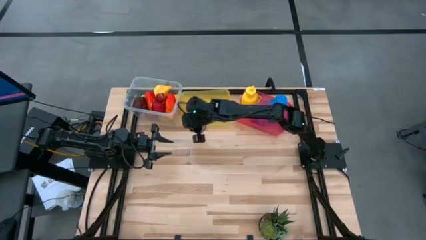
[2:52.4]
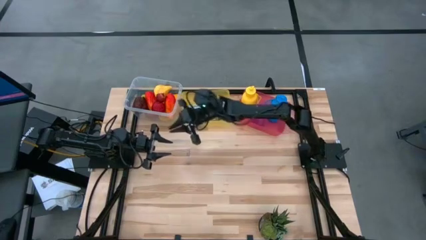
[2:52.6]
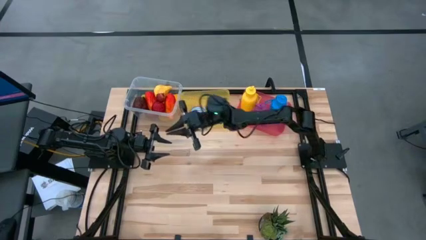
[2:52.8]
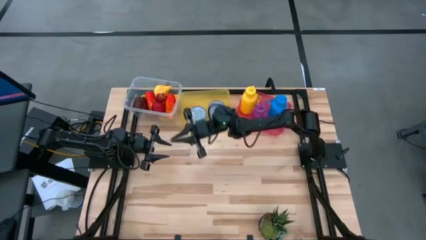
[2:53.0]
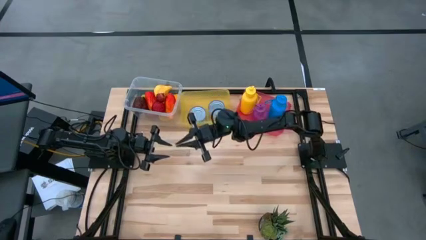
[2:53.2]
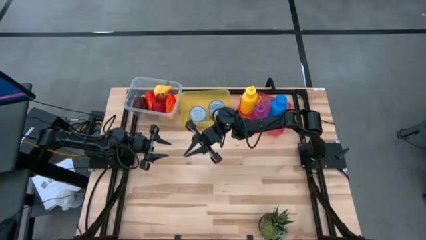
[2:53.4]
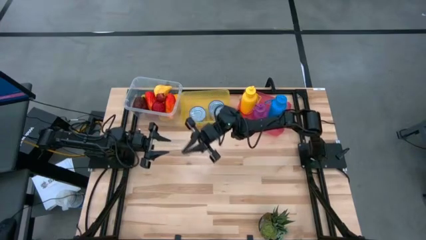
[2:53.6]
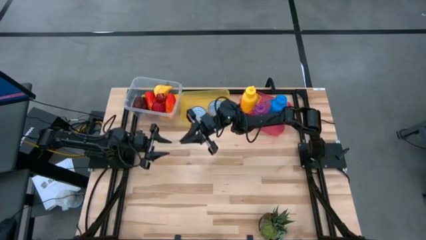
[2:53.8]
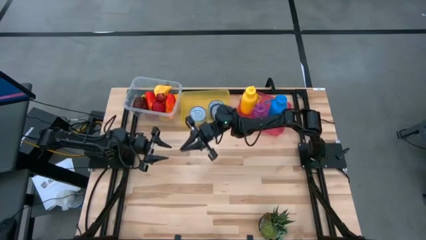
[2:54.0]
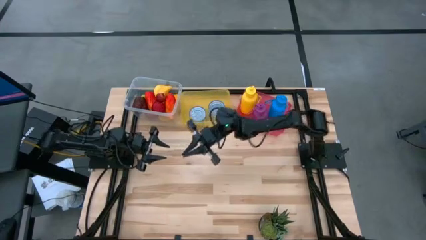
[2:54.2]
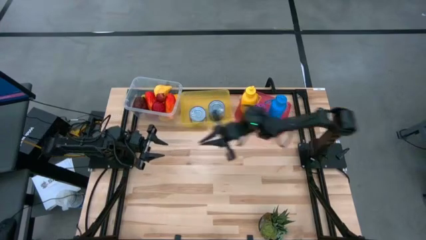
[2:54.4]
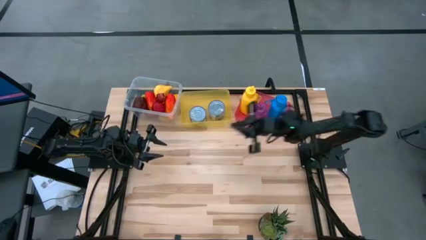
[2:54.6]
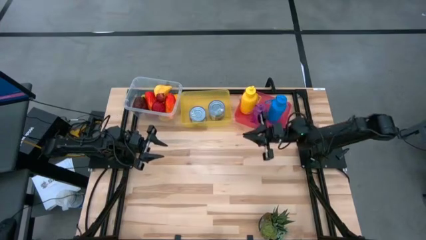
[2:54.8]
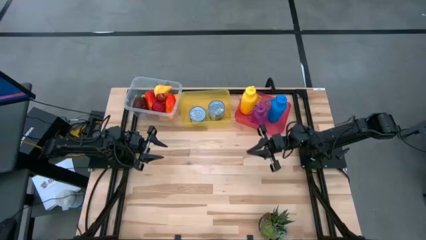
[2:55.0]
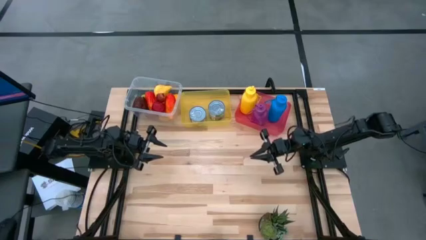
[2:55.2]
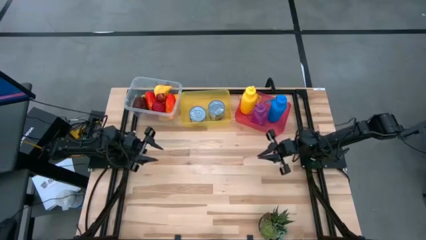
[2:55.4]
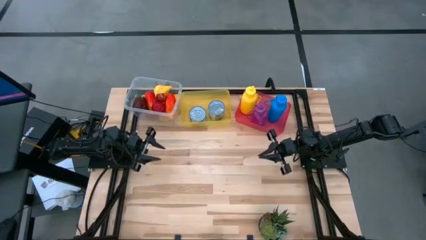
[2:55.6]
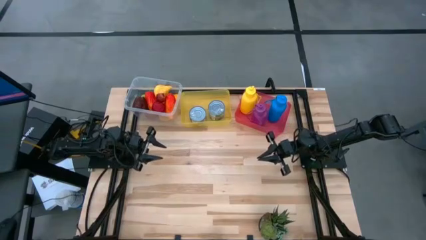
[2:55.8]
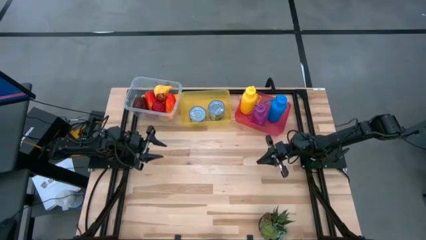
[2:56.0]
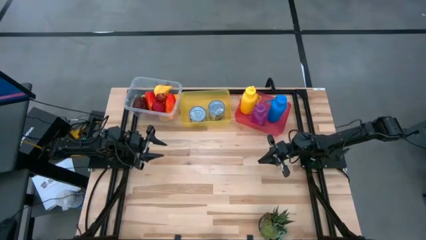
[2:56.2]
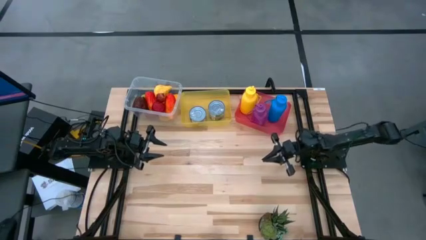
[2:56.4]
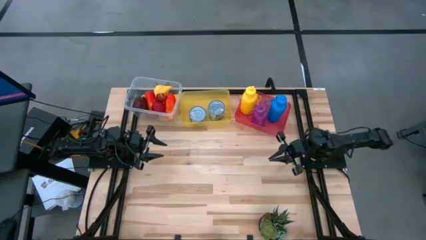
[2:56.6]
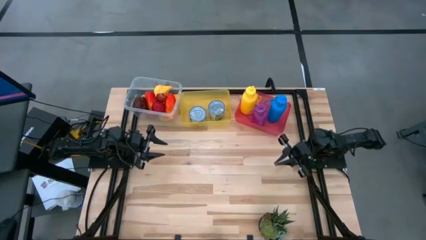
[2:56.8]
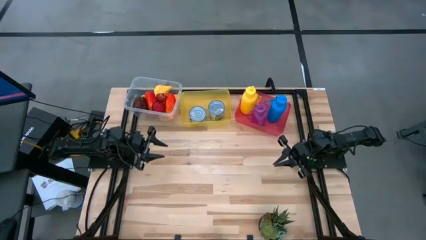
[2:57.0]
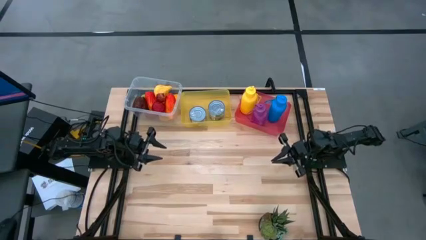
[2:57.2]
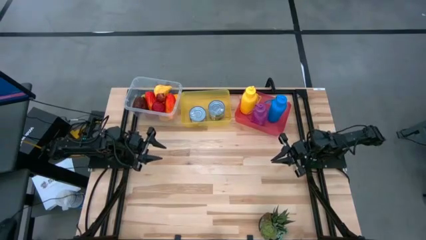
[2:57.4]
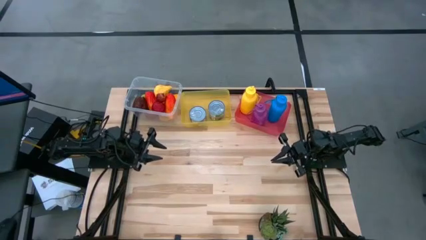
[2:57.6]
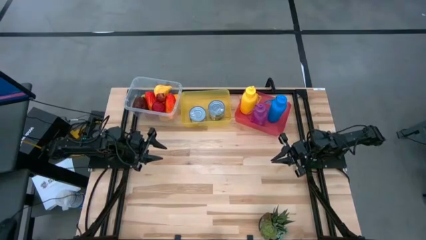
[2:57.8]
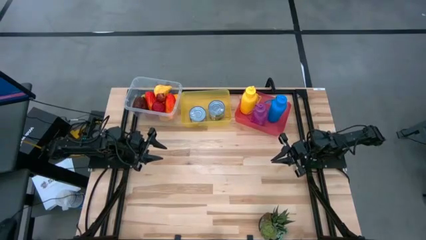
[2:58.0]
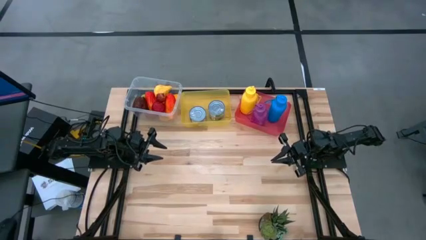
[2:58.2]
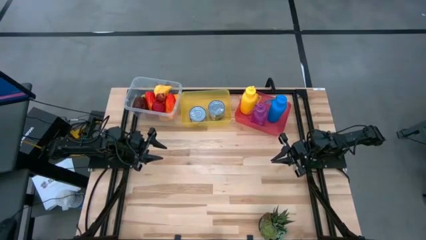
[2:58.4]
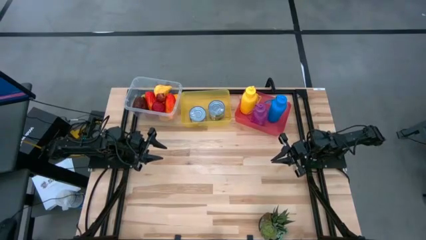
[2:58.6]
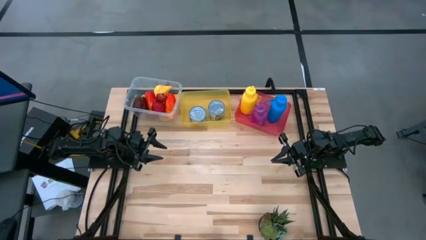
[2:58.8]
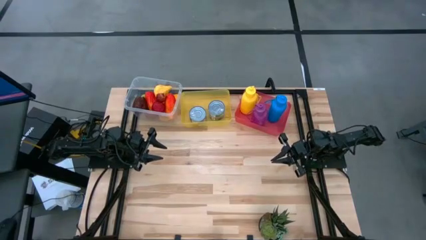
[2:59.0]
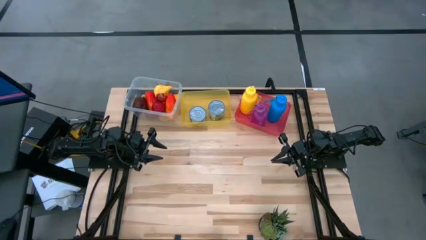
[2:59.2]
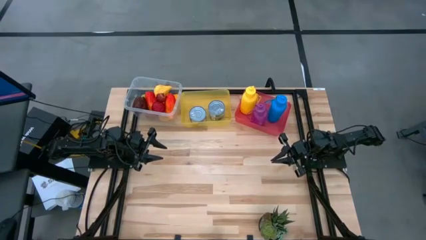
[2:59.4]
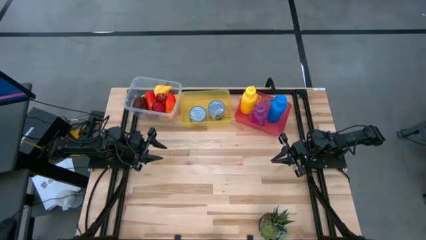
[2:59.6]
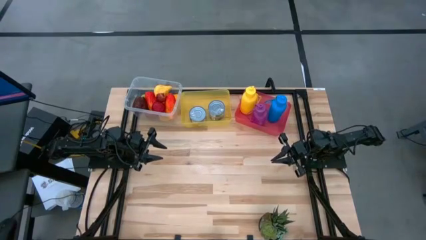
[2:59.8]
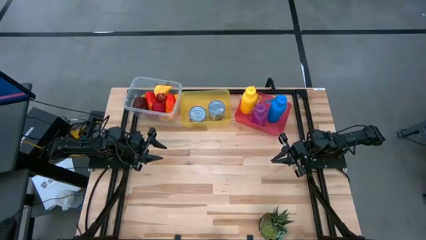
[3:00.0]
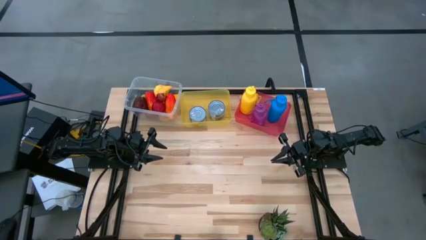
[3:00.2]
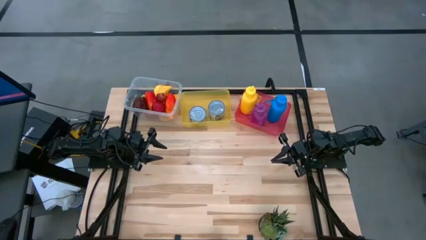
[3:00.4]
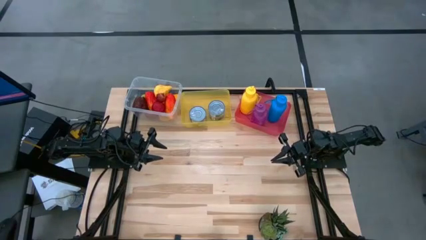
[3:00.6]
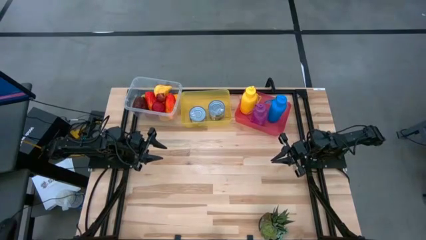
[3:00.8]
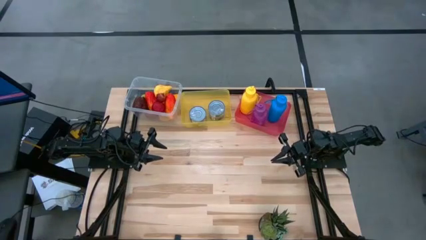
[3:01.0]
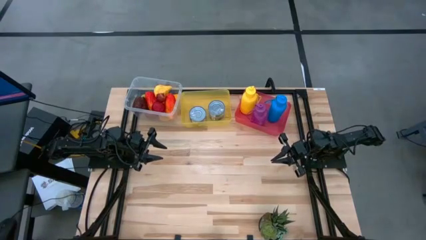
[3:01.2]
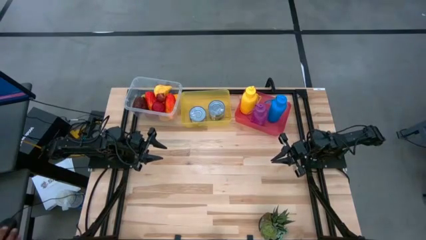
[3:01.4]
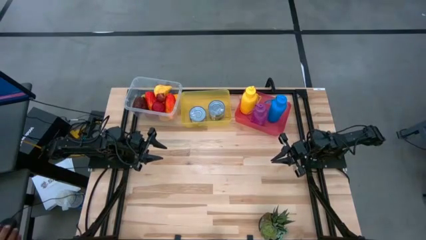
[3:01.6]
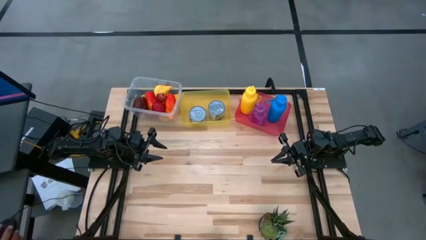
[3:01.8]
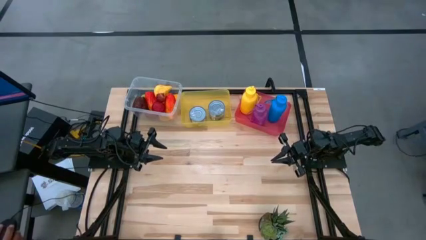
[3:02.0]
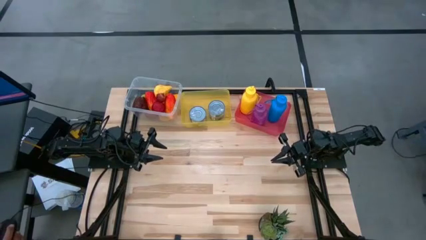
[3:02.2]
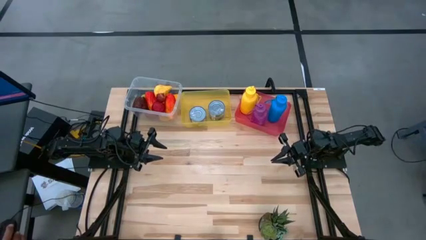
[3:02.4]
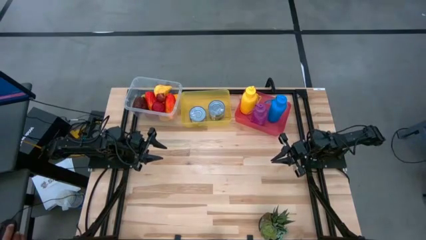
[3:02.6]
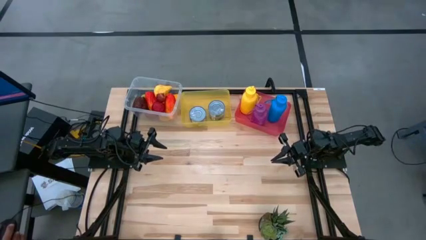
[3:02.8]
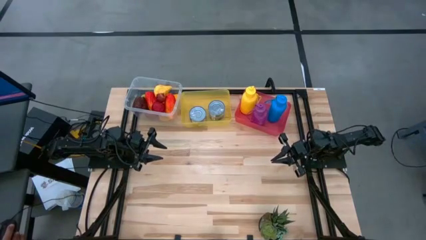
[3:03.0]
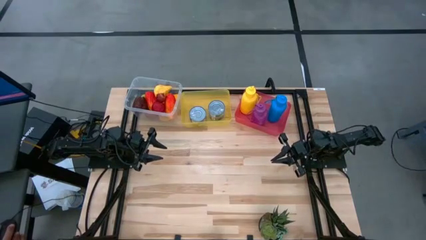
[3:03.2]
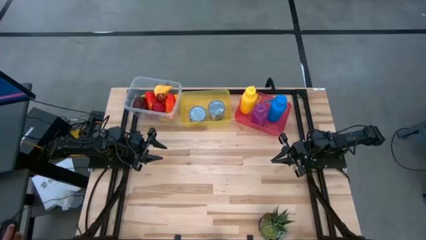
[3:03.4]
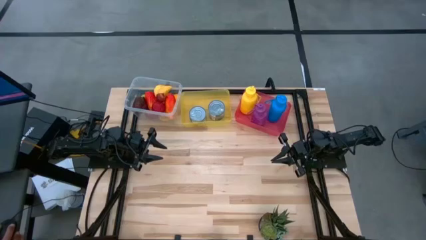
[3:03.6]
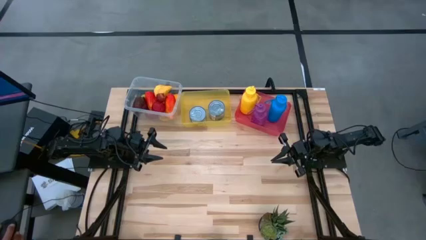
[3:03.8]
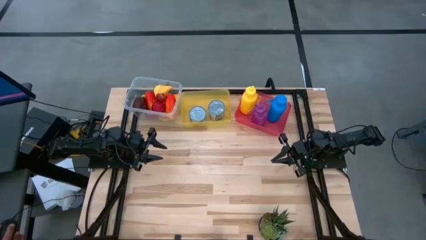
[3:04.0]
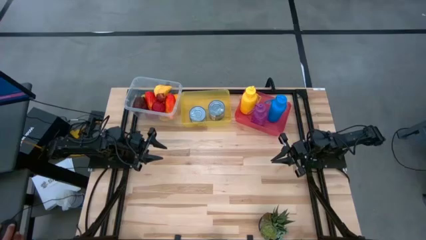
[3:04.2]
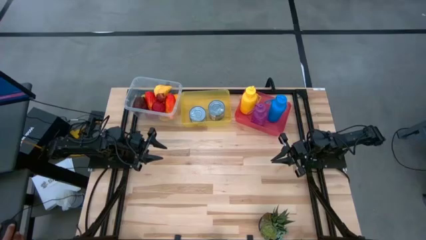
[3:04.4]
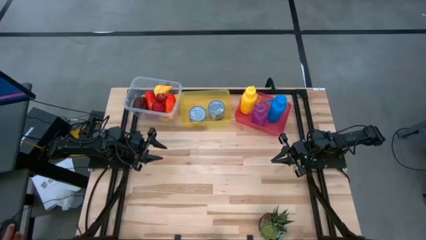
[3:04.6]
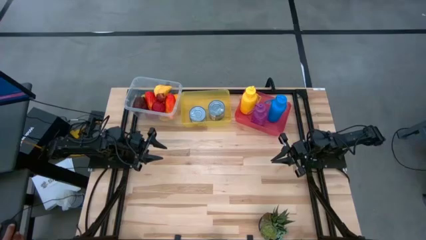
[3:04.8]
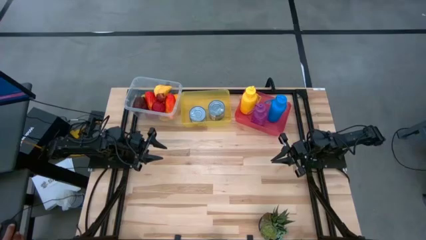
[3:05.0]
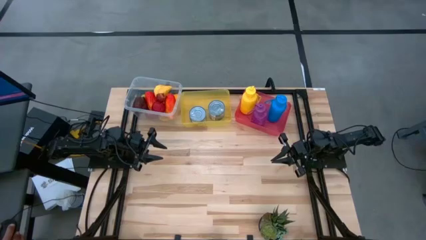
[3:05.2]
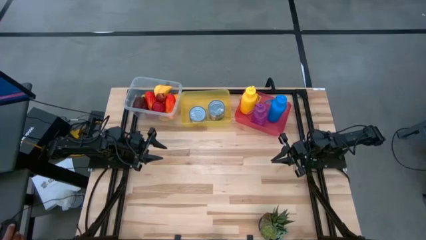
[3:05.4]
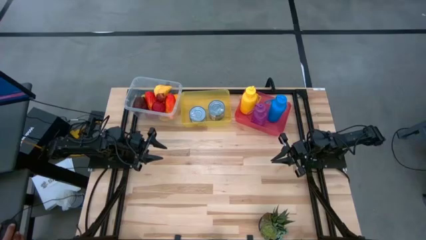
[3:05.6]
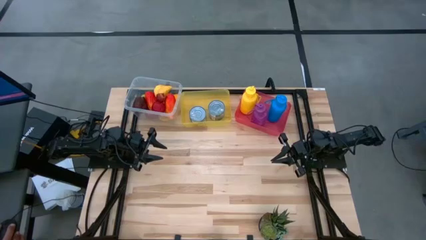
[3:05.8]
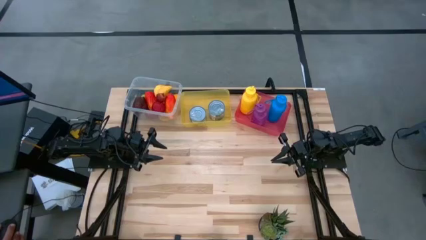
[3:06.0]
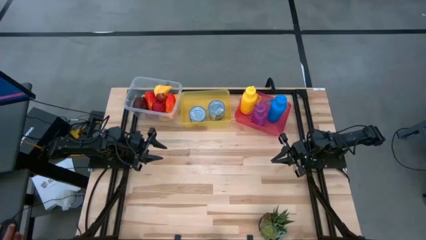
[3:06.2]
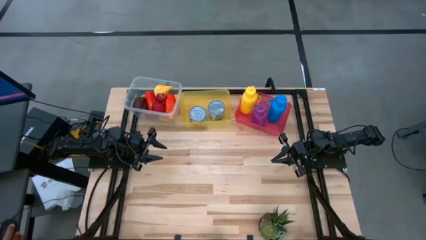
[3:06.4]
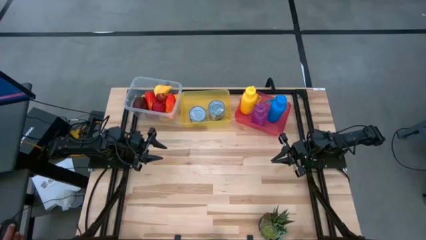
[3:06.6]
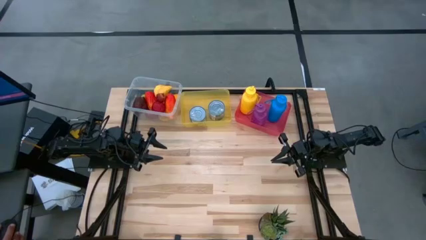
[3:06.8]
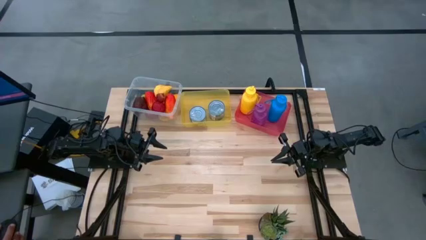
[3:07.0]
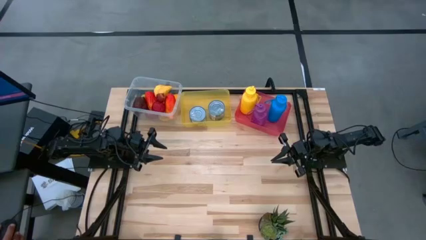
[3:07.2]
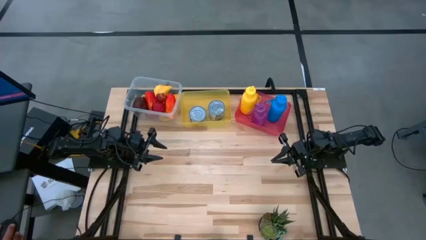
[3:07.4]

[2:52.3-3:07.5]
Task: Pick & Place Food Item
Return to Home Position
